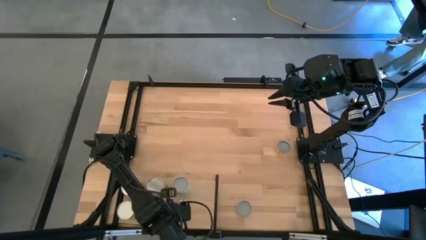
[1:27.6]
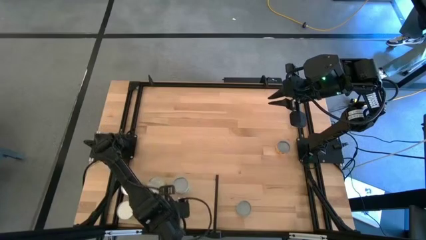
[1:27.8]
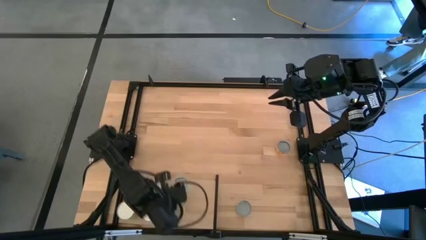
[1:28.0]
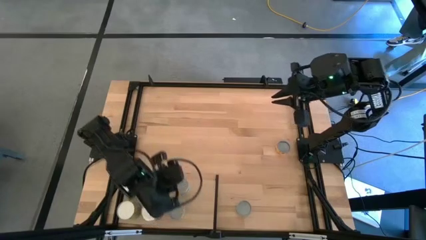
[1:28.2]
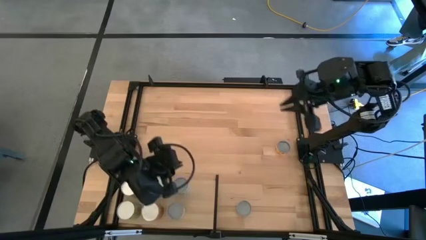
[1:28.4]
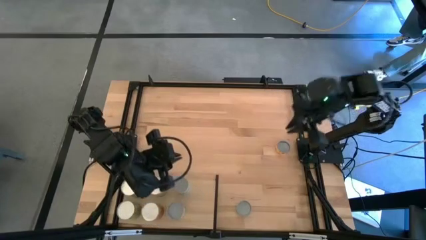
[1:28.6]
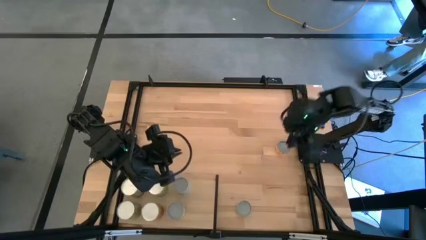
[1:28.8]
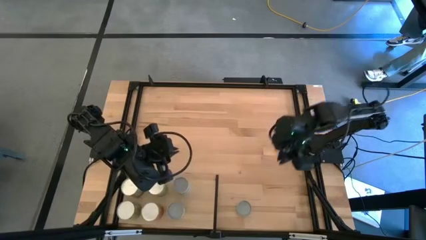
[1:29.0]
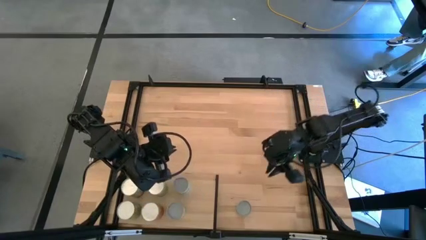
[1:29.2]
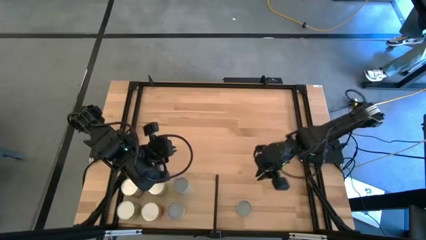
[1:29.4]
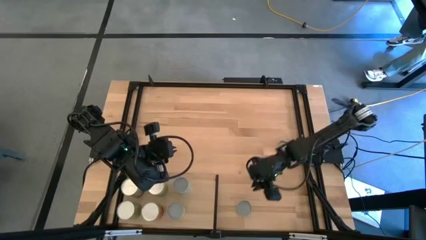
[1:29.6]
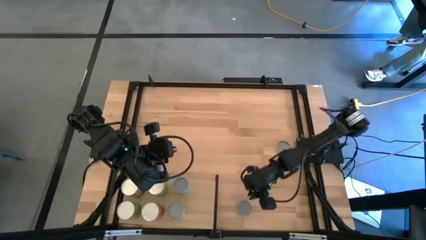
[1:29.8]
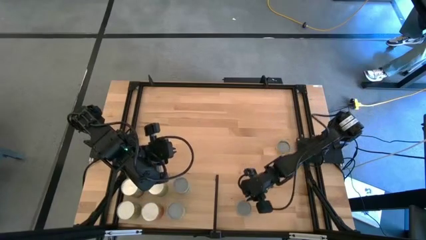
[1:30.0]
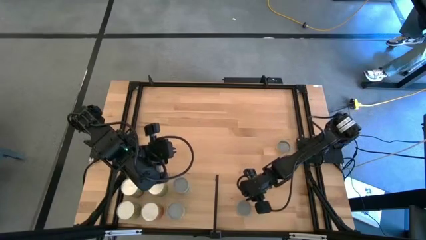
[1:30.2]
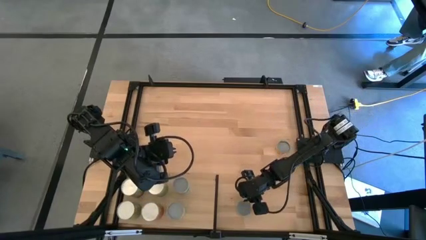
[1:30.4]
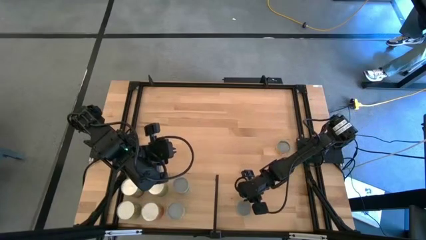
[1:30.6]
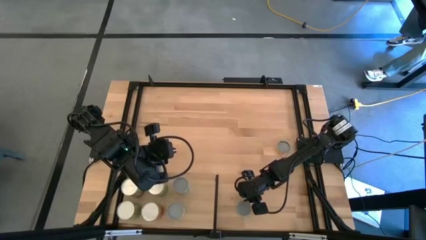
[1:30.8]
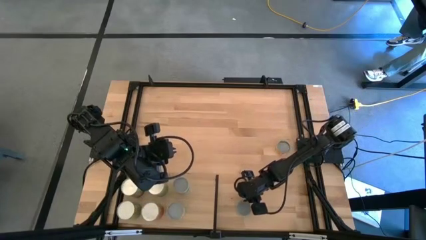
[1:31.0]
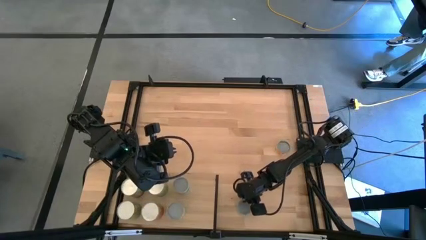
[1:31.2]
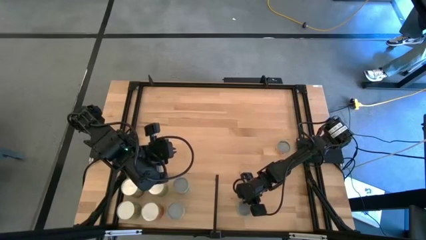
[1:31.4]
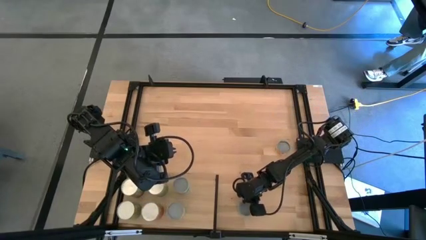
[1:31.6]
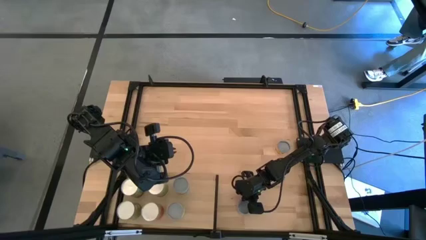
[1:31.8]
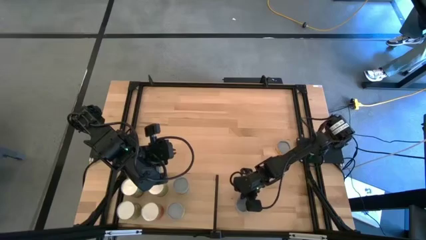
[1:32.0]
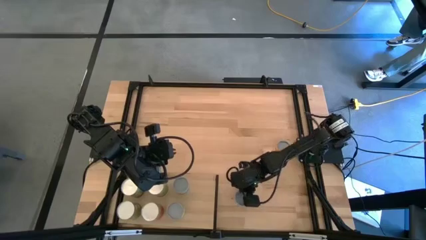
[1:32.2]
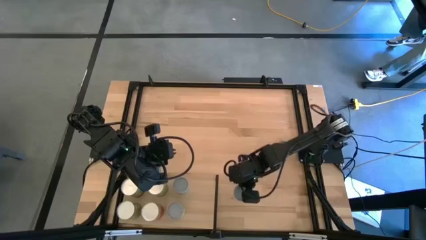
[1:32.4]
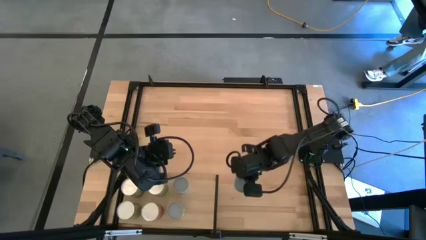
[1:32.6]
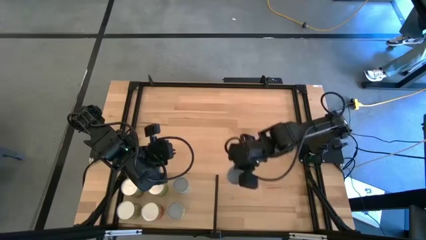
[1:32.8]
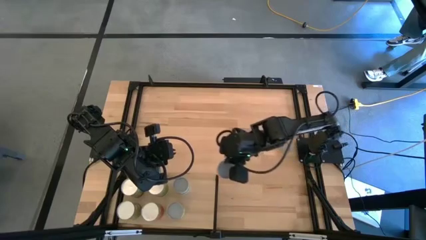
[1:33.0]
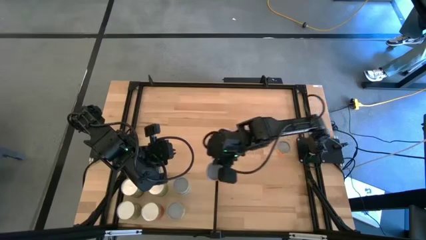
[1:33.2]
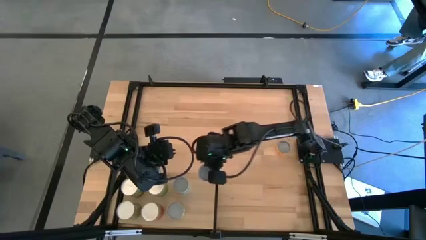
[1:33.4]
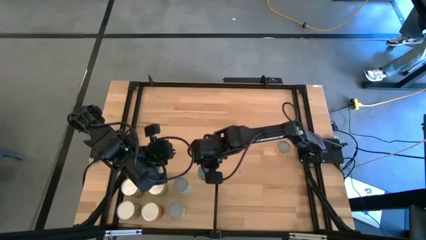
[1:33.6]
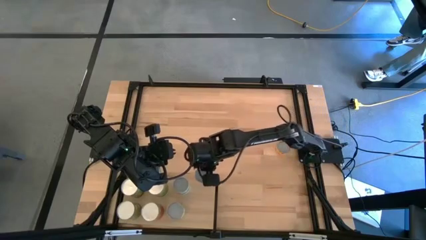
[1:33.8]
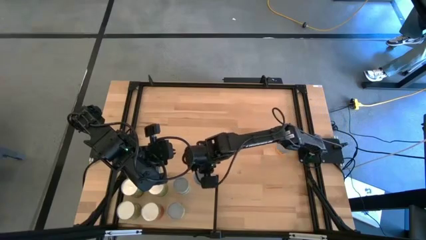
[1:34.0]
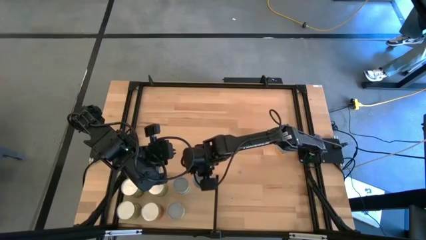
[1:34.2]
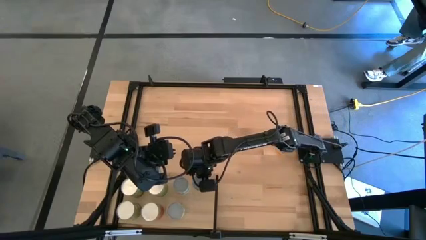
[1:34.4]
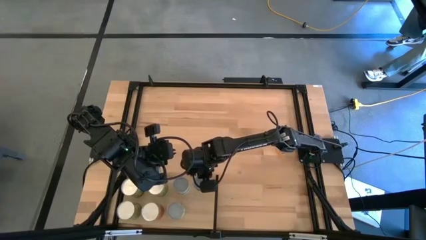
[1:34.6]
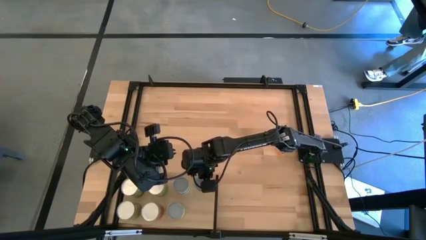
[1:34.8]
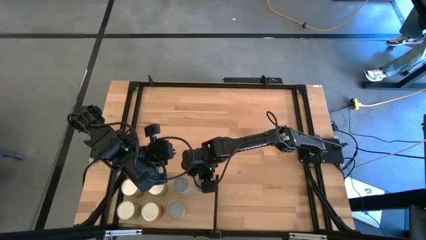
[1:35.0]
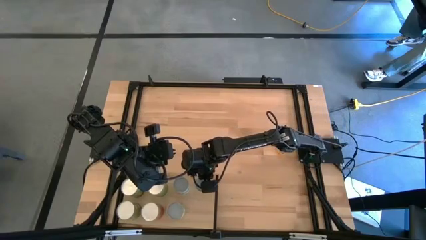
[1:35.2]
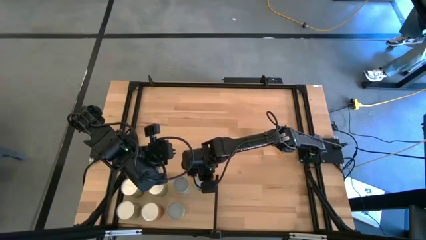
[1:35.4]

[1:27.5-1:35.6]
Task: Pick and place cans onto a shelf
Put the canned salmon on the shelf

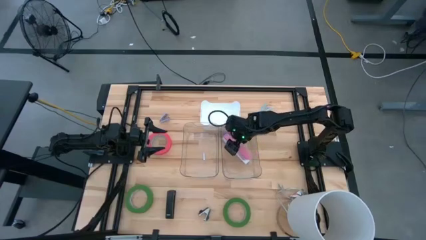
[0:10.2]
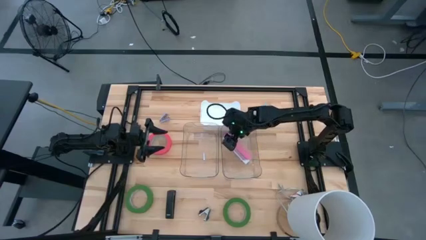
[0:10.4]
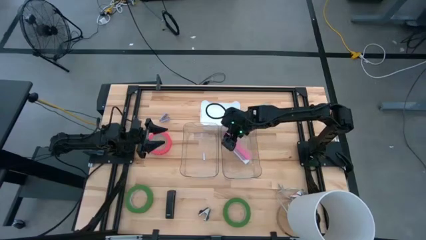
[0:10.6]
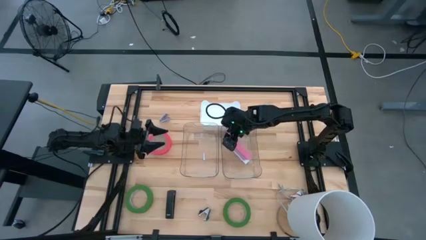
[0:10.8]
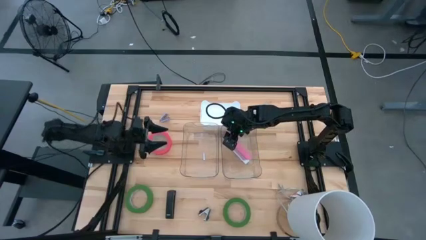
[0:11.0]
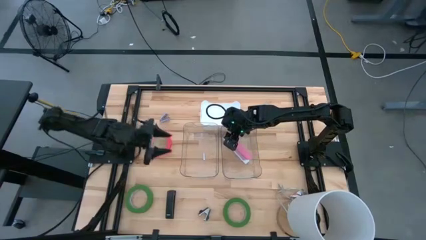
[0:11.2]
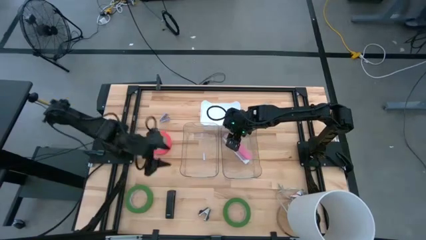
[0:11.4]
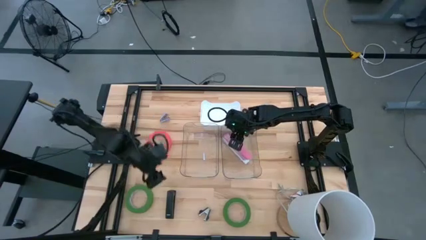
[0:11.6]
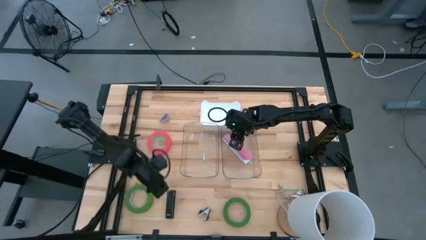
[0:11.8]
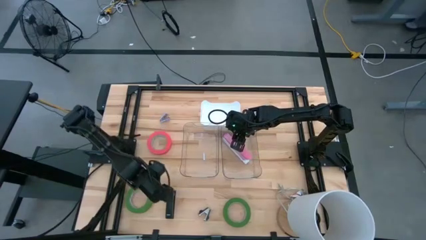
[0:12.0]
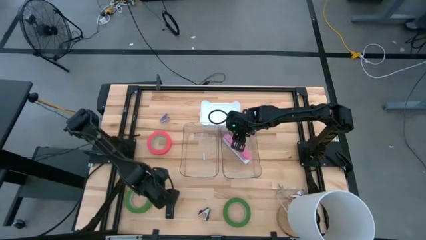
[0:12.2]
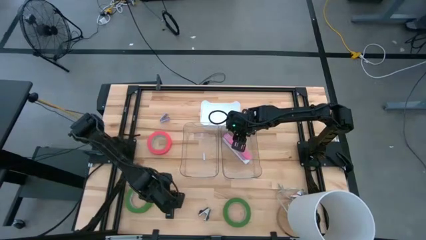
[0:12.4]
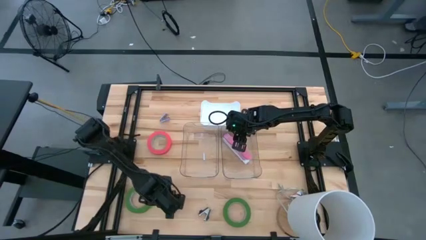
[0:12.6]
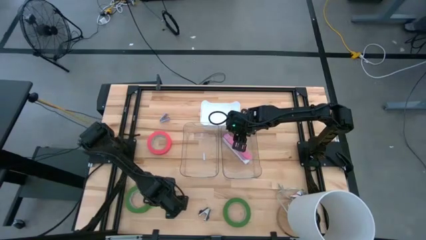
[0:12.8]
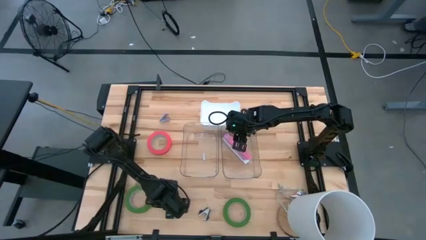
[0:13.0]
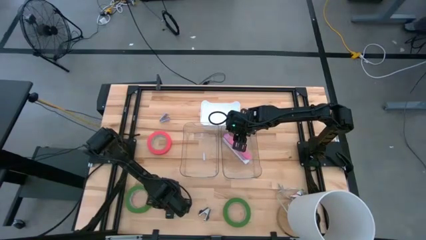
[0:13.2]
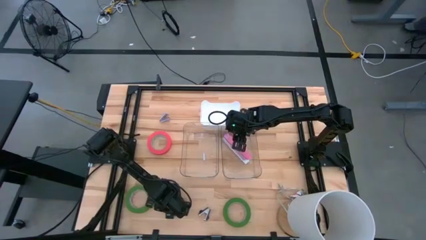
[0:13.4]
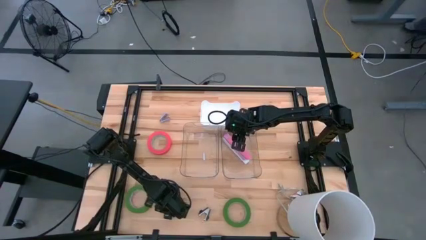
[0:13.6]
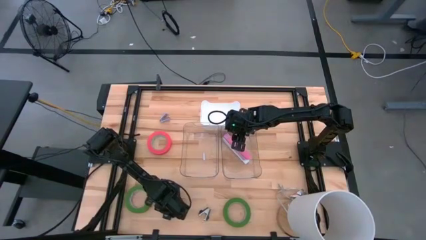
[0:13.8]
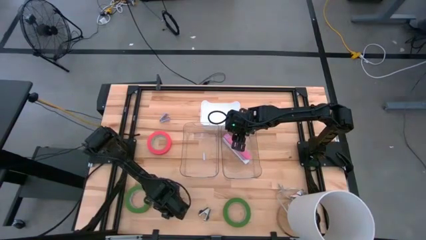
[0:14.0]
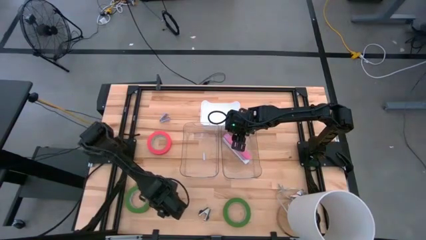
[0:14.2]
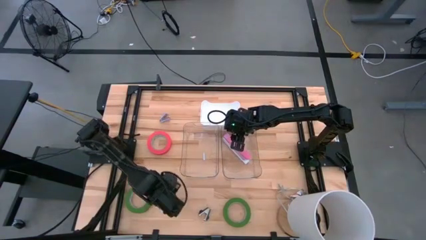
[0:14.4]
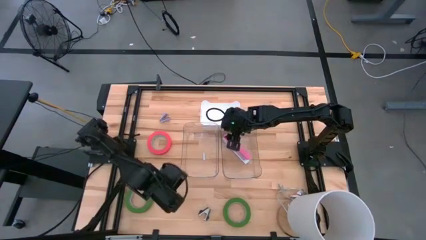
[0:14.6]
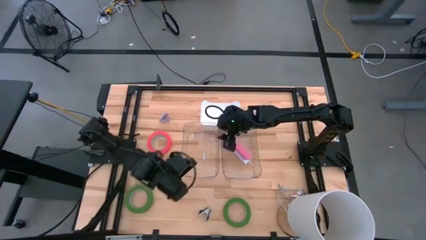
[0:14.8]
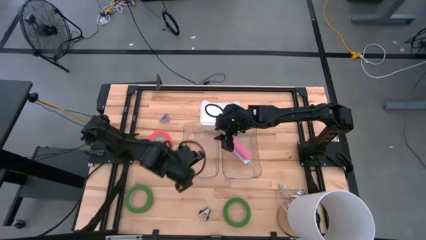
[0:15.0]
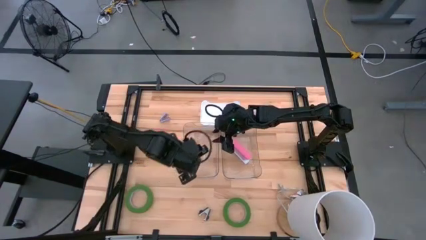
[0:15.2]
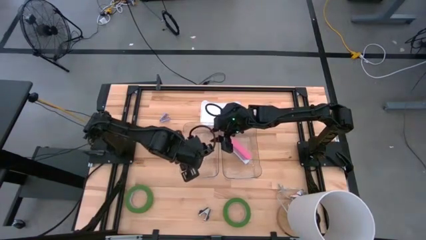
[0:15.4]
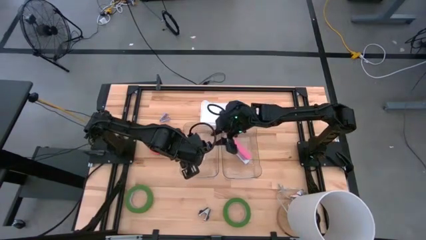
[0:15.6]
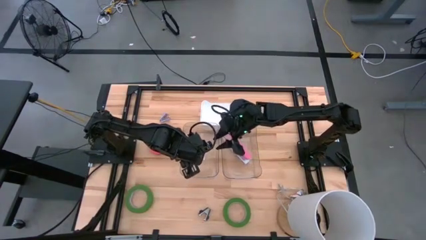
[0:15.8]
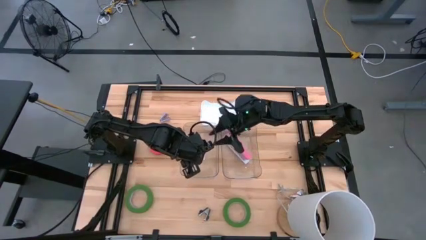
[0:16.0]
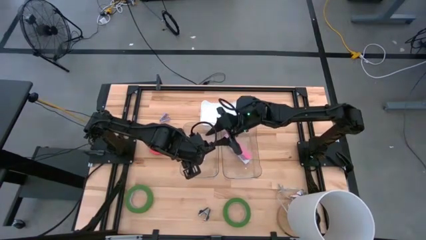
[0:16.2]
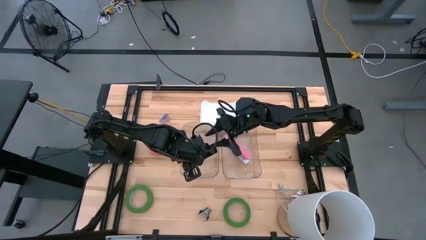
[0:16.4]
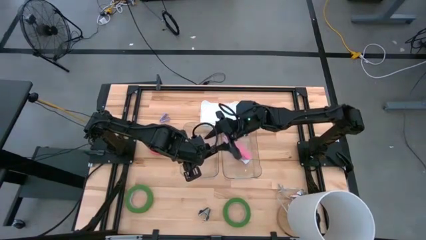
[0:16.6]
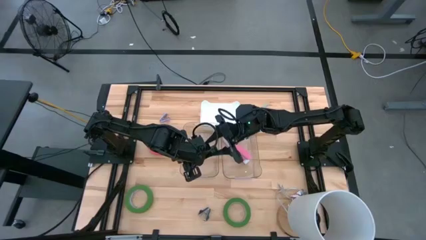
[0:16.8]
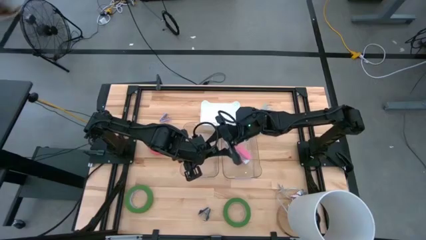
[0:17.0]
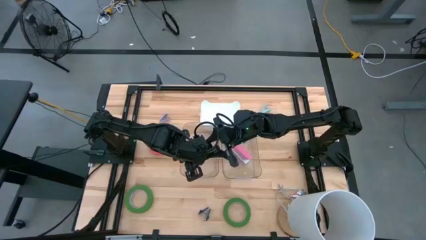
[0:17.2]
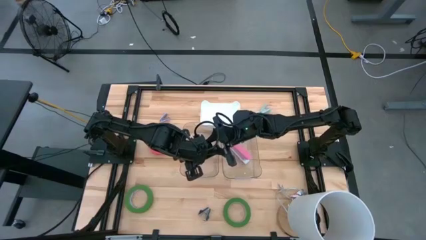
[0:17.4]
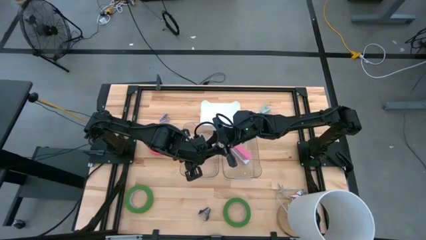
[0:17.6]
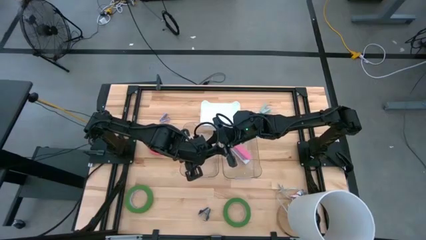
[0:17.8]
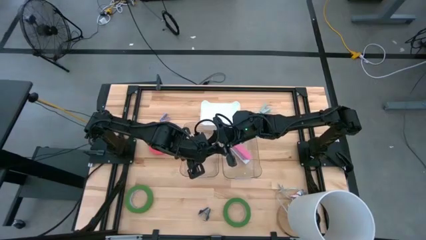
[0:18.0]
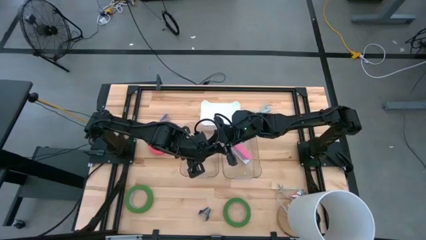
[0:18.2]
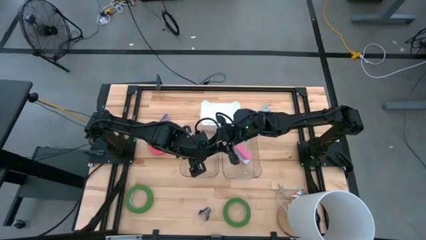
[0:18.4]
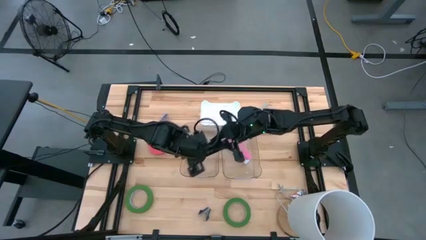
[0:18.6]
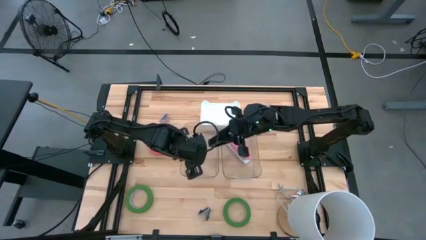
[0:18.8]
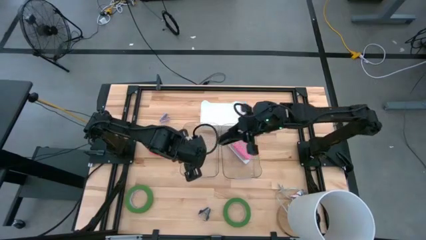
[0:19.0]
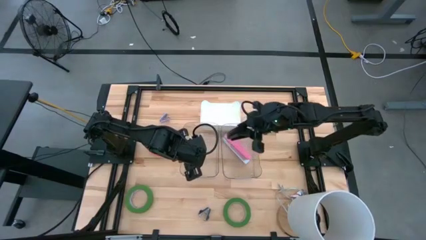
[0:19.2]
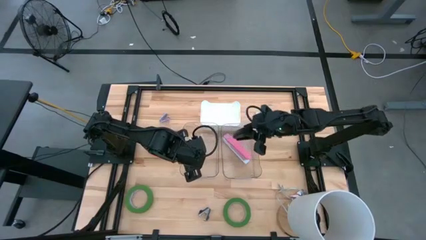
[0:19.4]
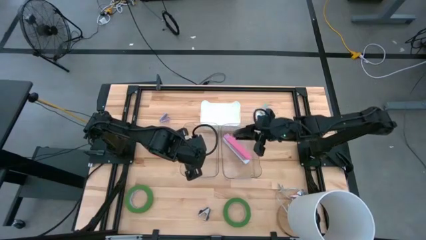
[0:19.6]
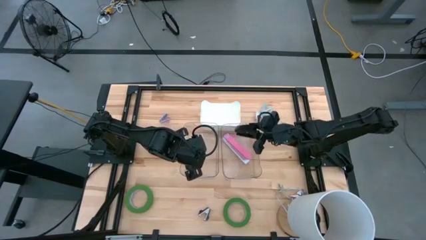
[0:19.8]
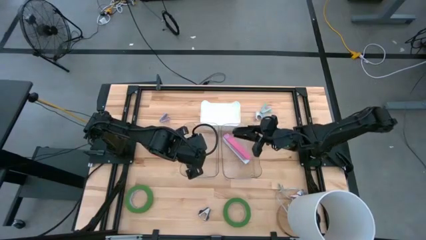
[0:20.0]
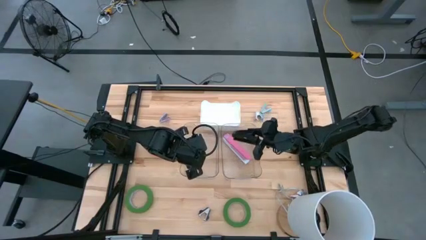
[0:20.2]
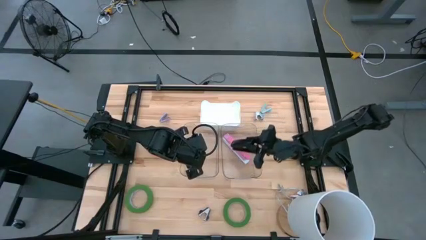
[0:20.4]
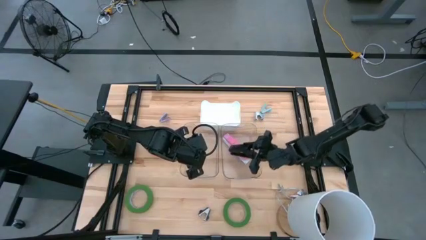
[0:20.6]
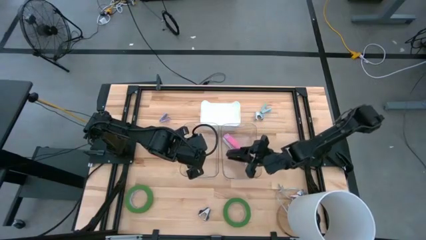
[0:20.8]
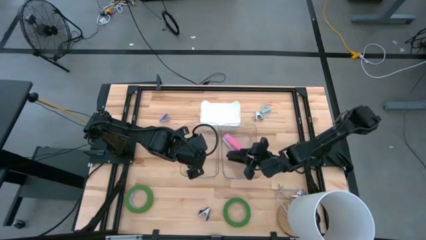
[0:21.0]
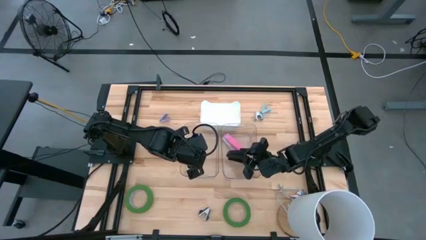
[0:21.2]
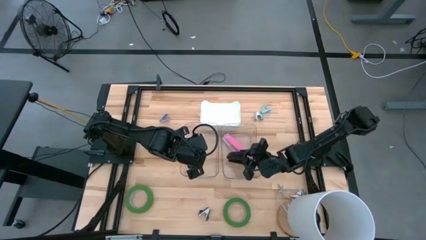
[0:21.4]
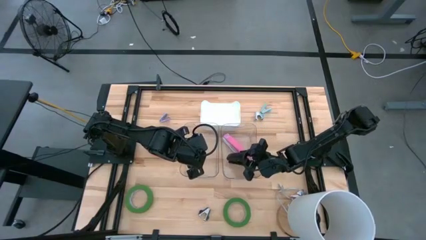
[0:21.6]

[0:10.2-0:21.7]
Task: Pick and place Stapler, Stapler remover, tape
Put the black stapler into the right transparent bin
